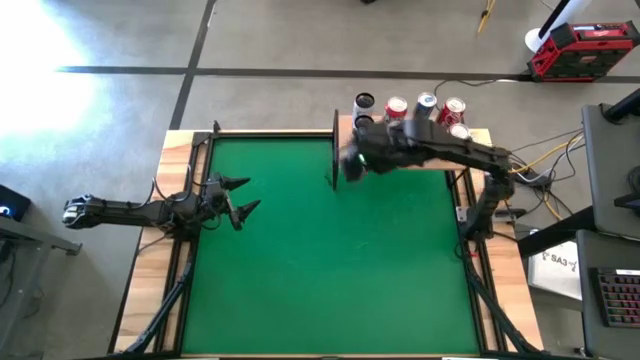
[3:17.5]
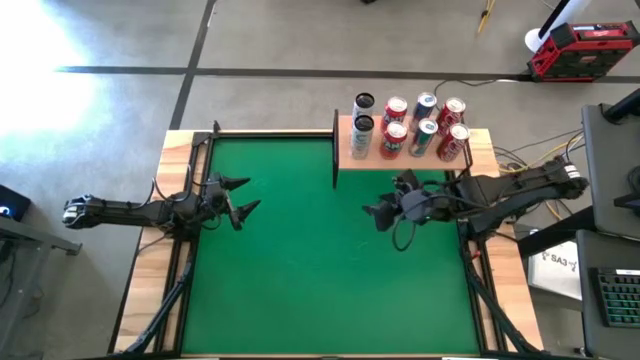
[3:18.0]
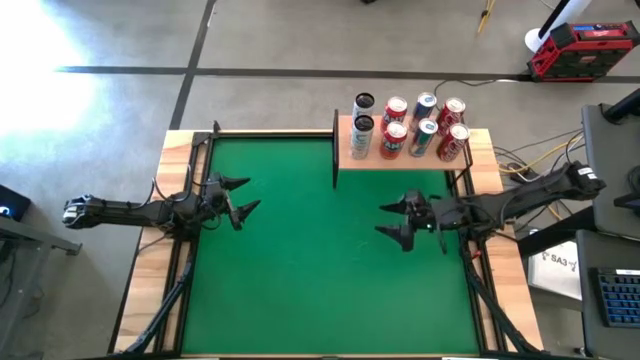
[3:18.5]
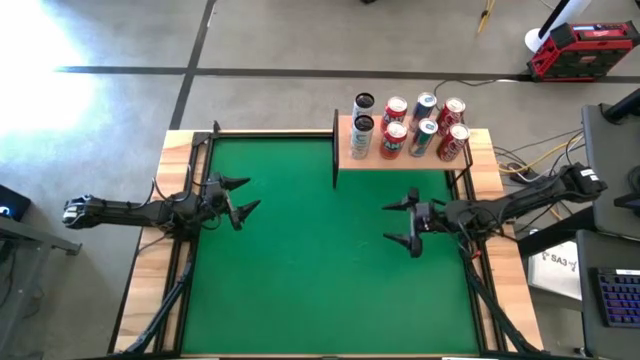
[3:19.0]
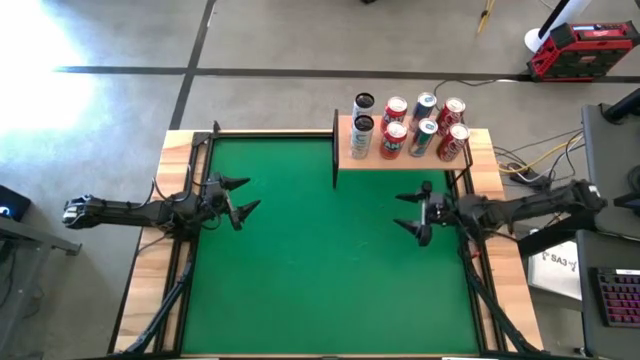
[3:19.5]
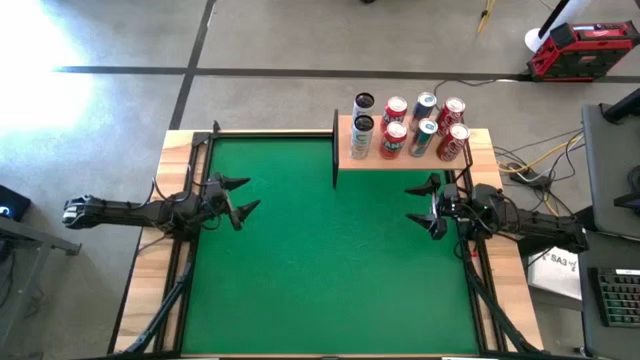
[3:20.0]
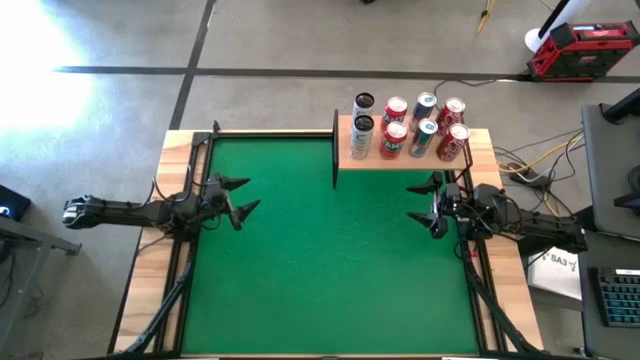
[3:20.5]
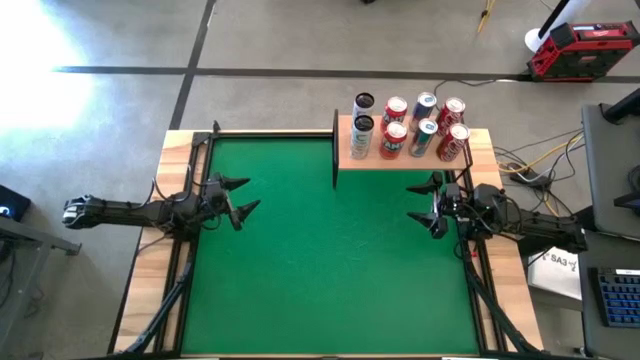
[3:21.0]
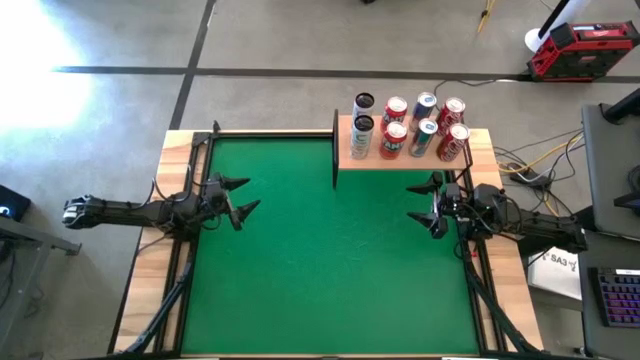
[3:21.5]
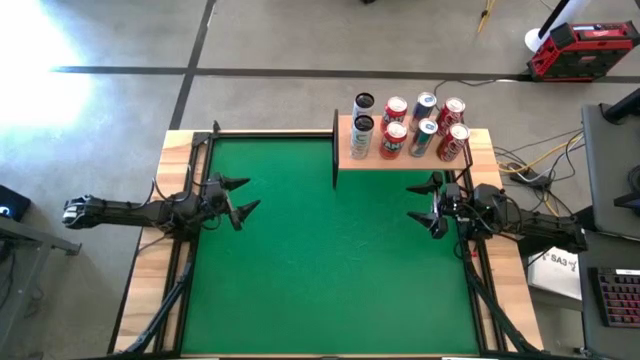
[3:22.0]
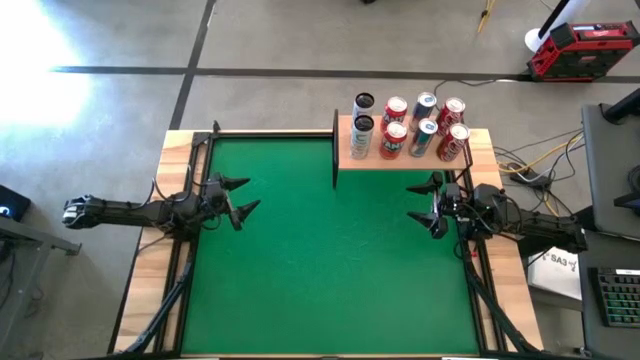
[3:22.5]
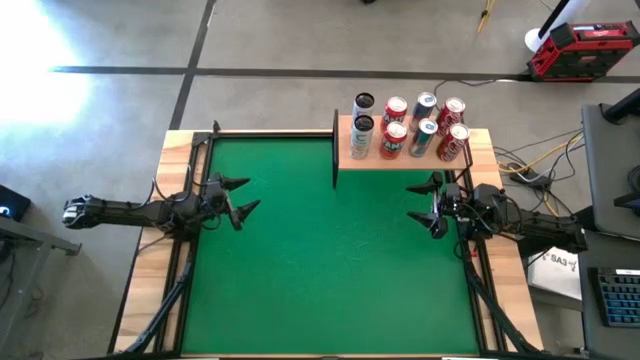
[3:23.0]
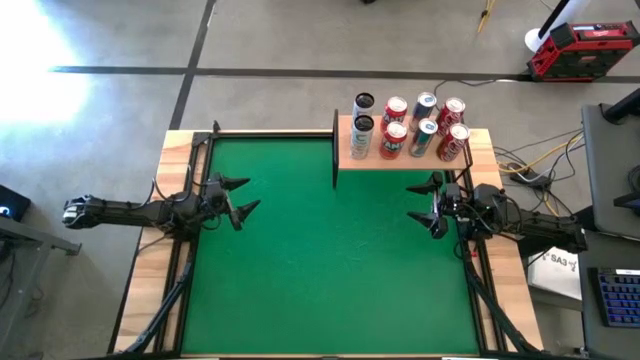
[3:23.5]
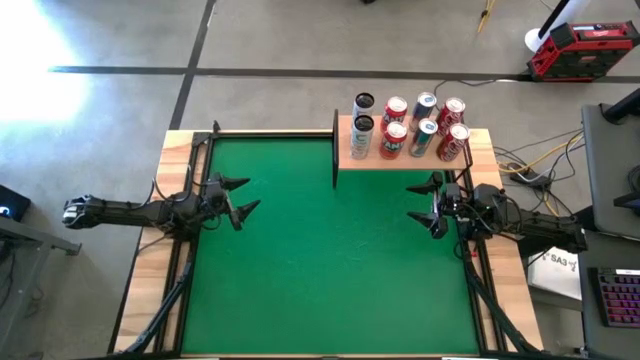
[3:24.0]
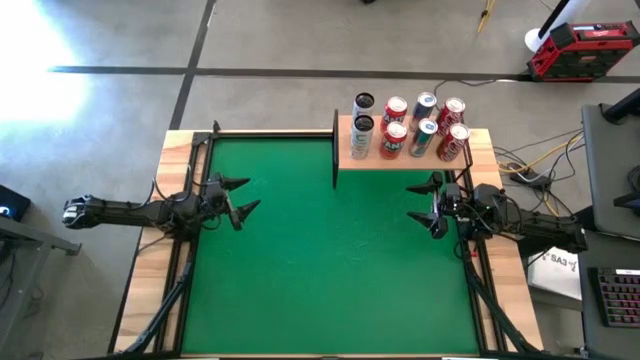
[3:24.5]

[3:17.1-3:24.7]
Task: Place canned beverage on shelf
Return to Home Position

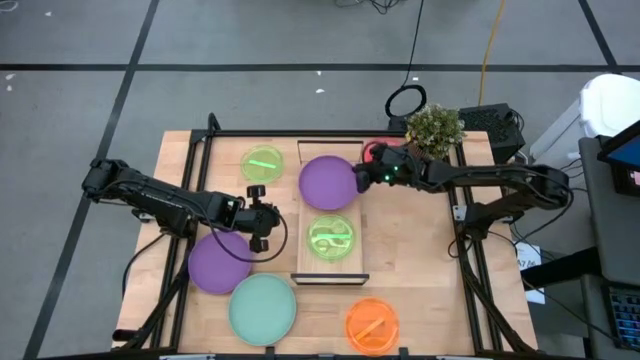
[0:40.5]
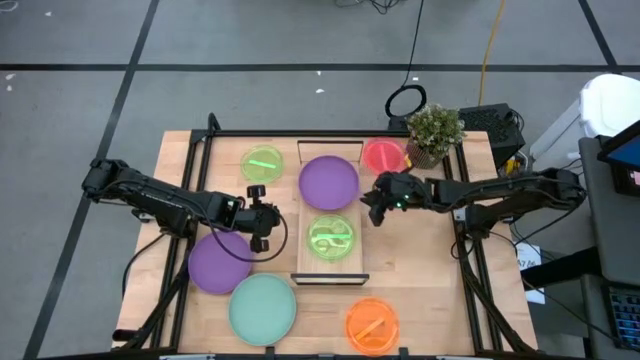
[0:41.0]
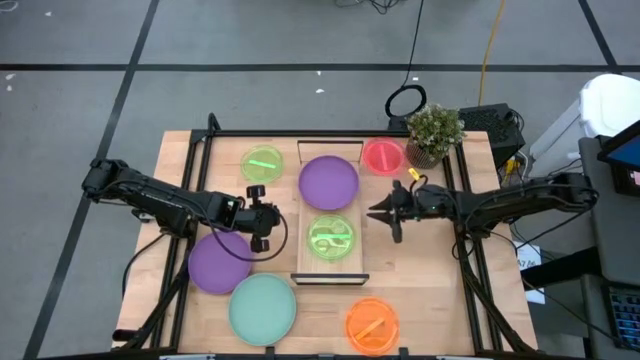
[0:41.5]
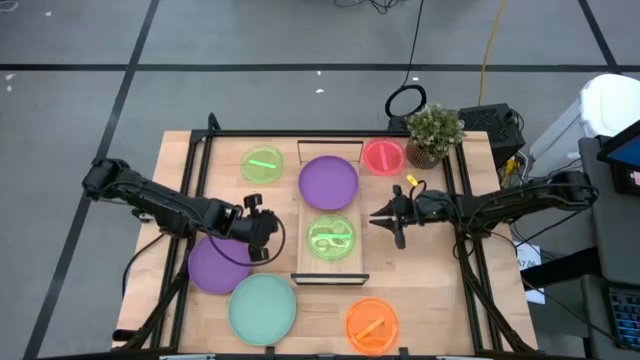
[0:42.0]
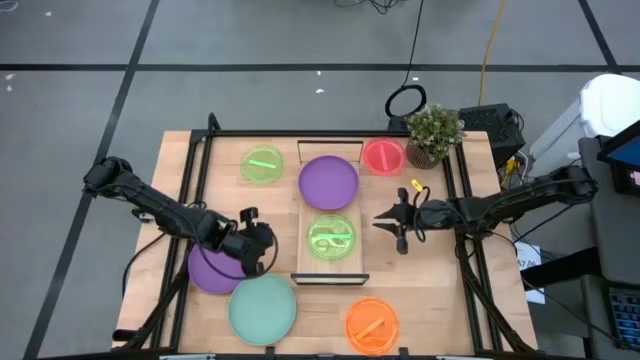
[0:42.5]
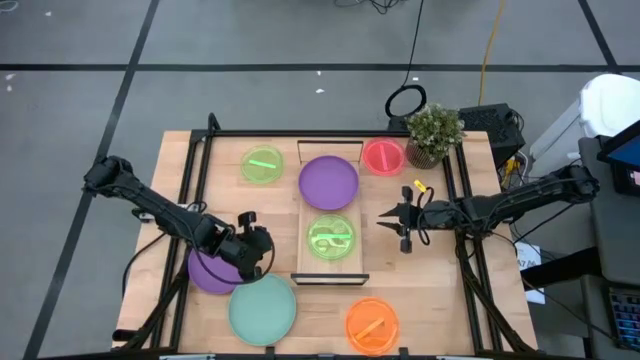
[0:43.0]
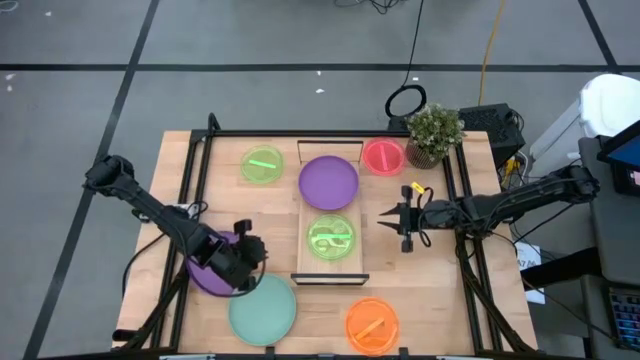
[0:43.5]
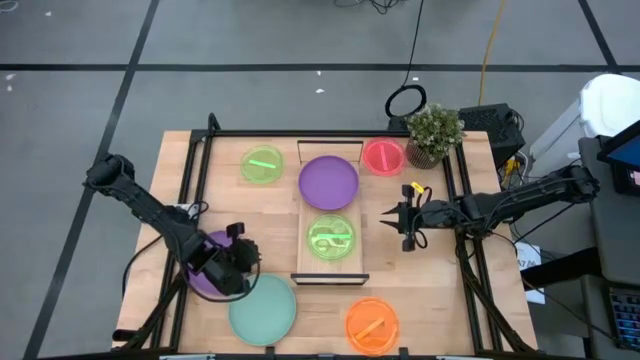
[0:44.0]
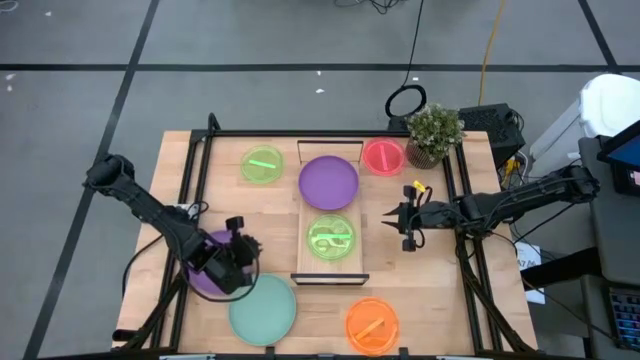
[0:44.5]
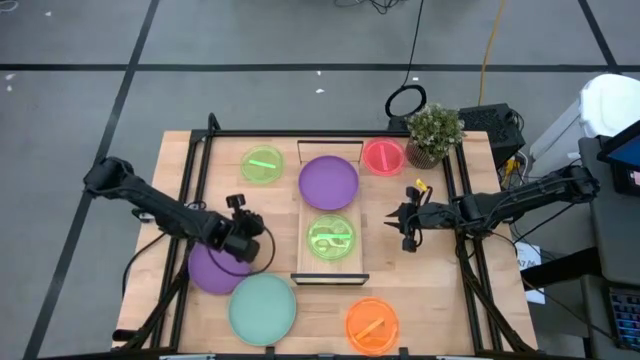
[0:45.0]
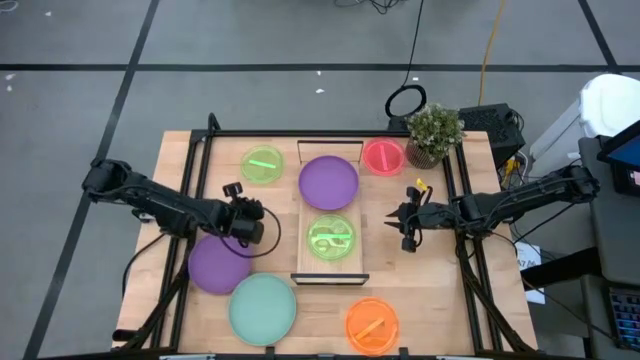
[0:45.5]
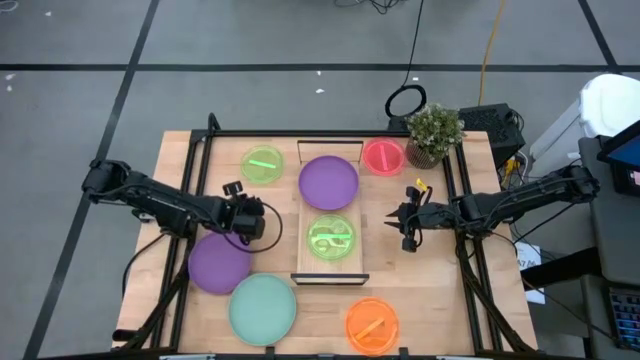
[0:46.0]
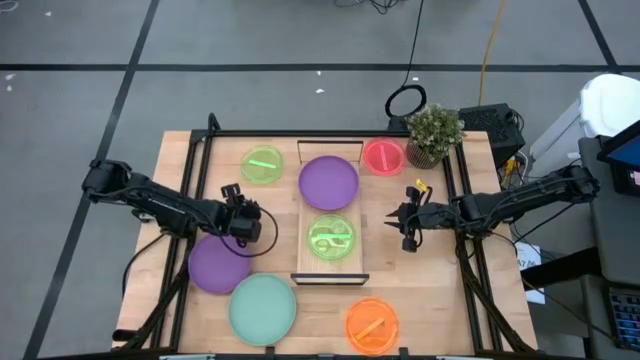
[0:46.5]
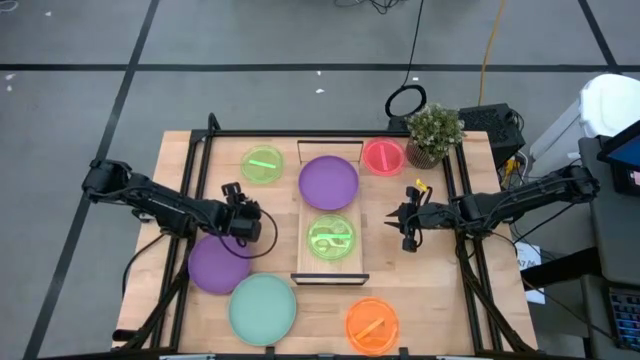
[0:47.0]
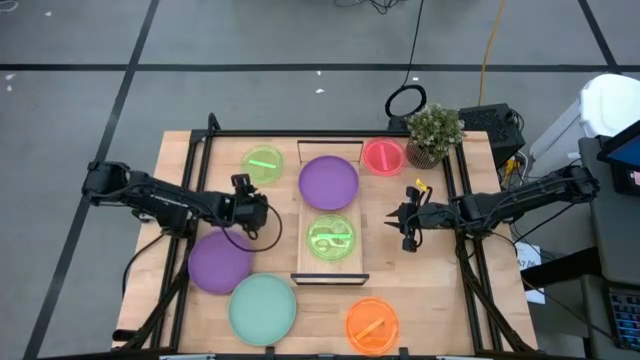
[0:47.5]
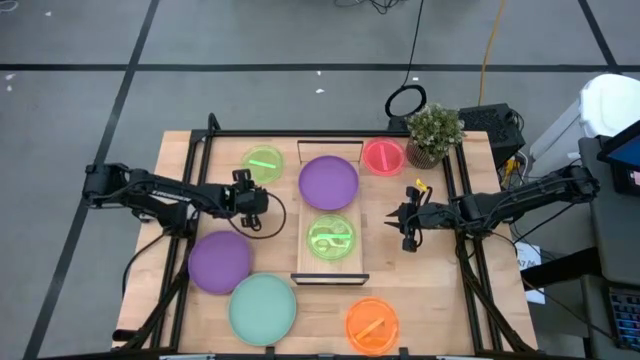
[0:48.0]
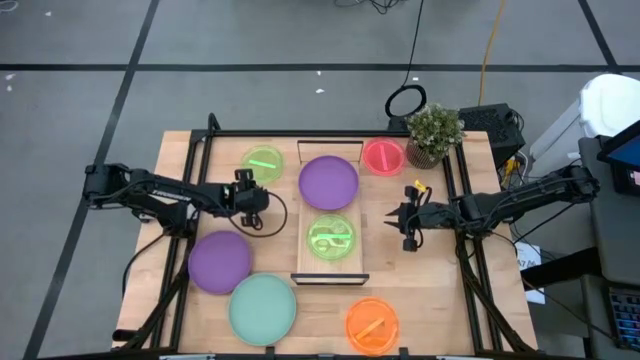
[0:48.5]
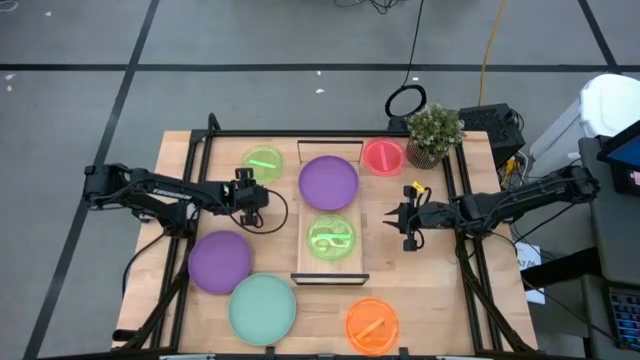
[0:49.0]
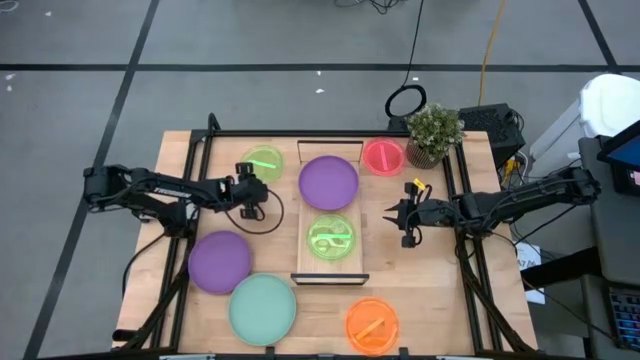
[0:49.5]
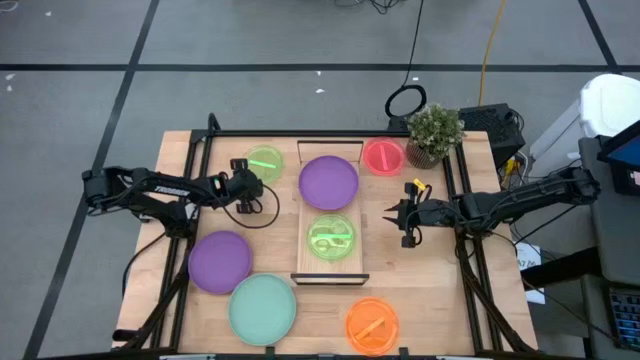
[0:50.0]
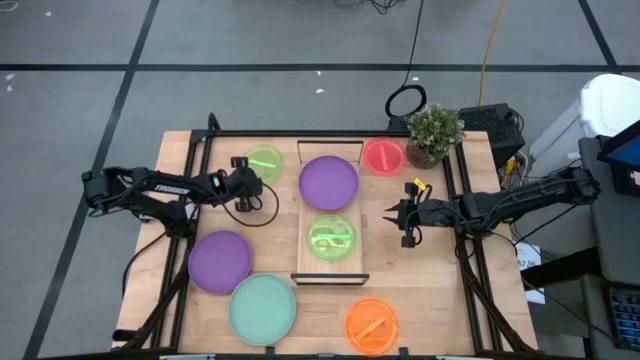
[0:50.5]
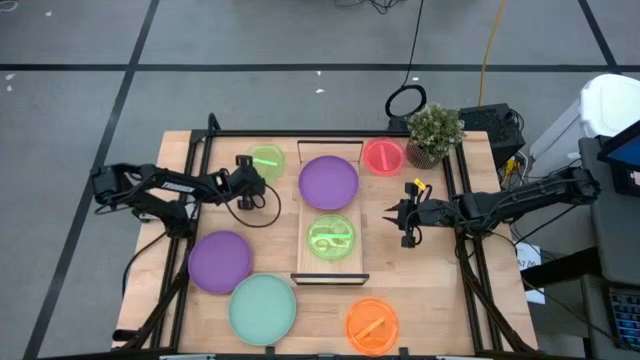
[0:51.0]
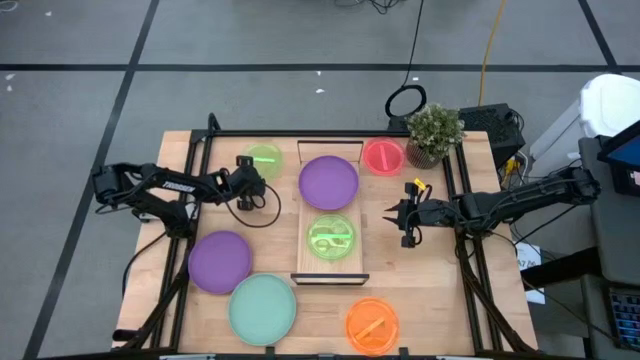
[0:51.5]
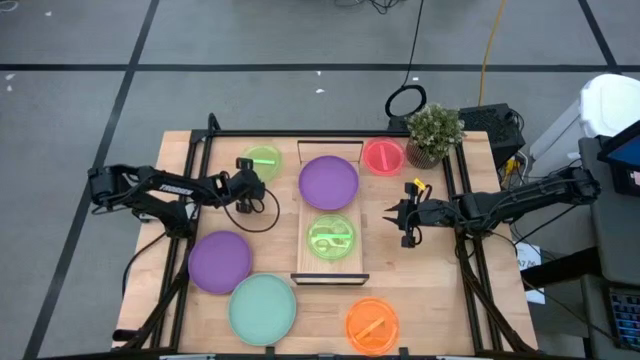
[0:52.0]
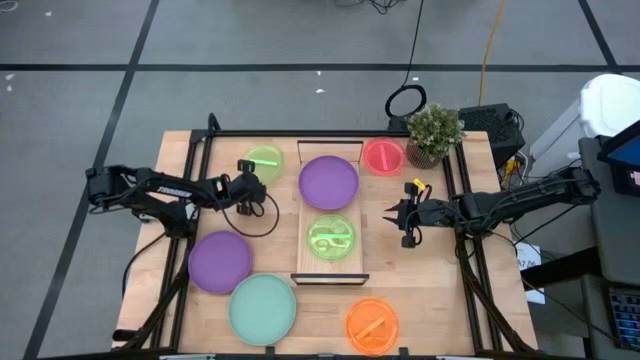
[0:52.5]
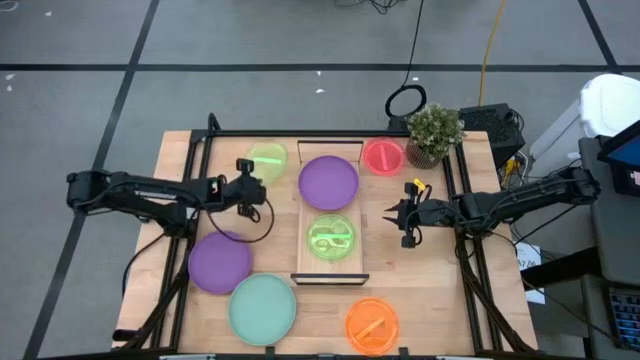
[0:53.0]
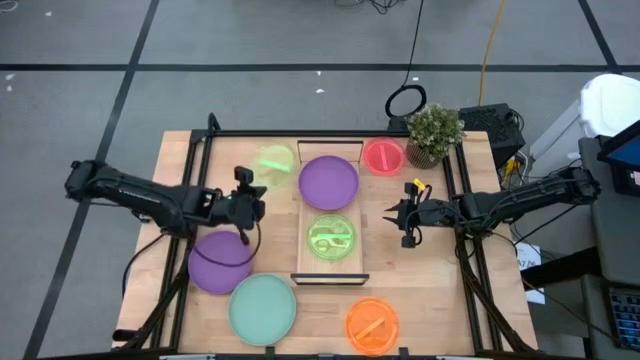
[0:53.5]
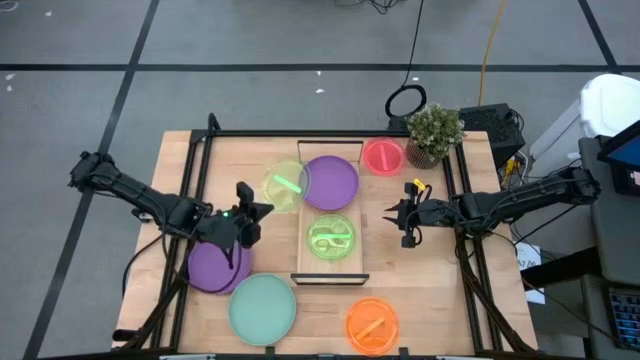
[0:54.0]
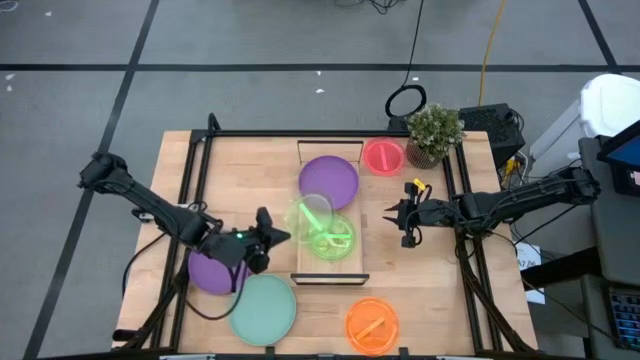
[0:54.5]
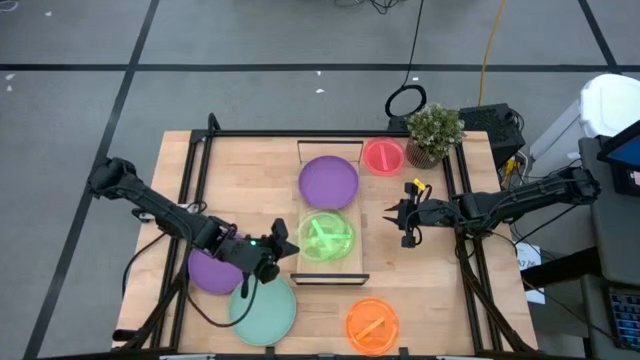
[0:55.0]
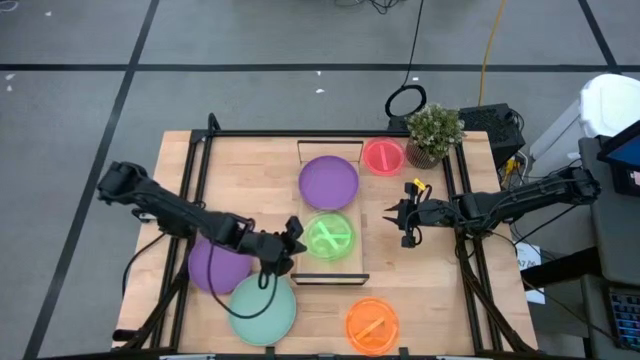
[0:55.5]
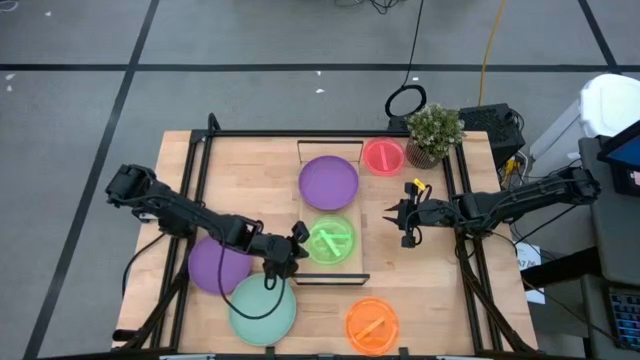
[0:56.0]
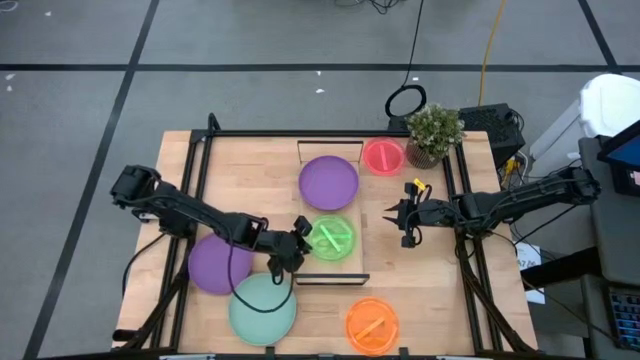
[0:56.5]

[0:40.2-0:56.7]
Task: Place and stack plates onto a shelf
Stack the green plate on top of the green plate on the shelf
